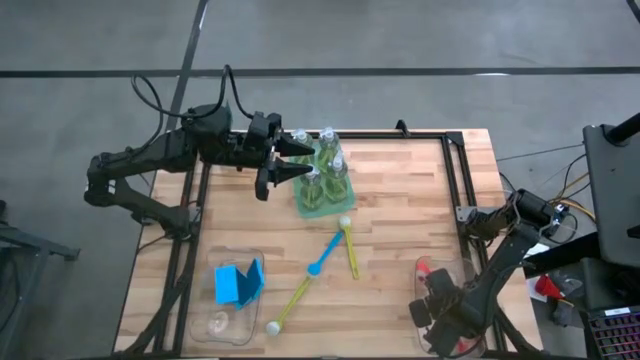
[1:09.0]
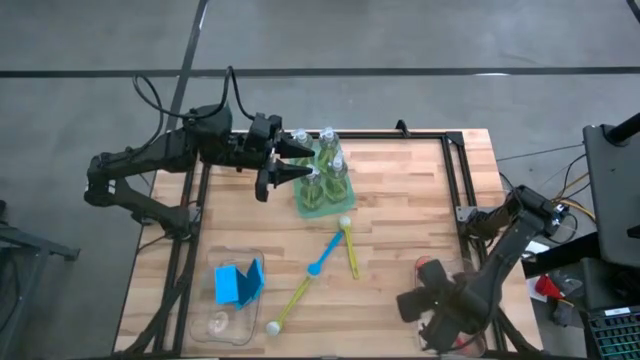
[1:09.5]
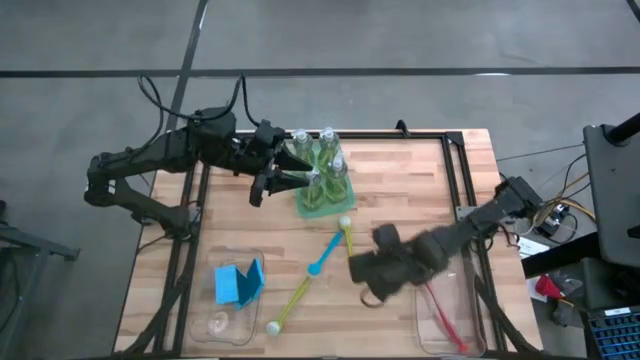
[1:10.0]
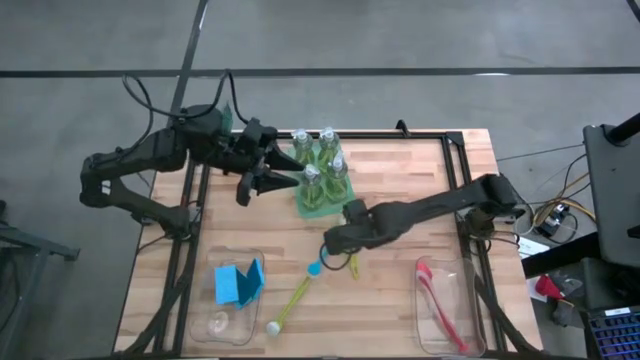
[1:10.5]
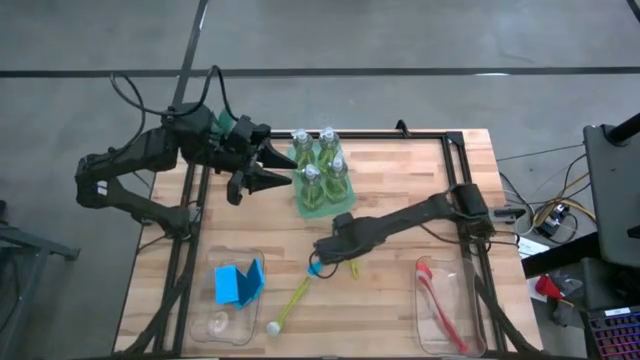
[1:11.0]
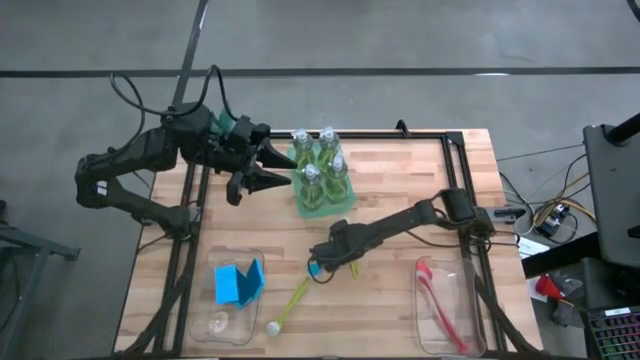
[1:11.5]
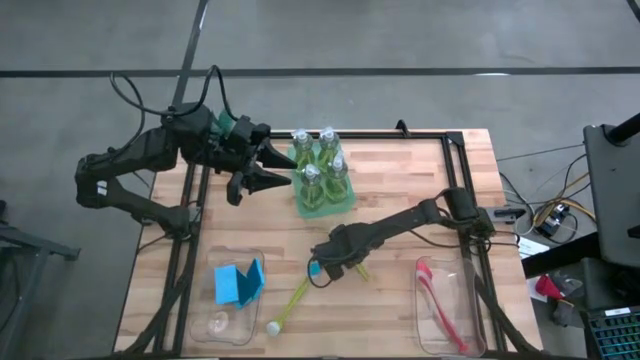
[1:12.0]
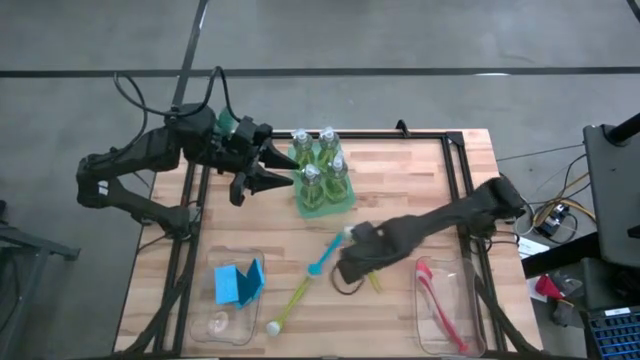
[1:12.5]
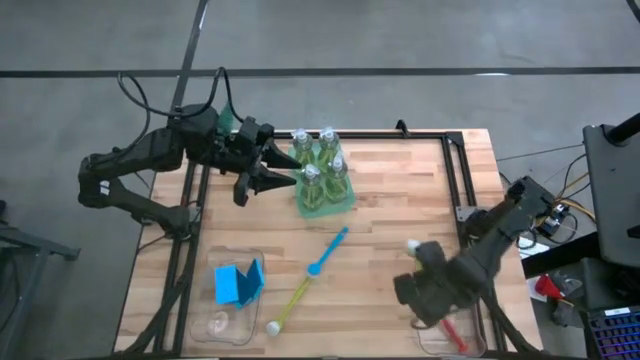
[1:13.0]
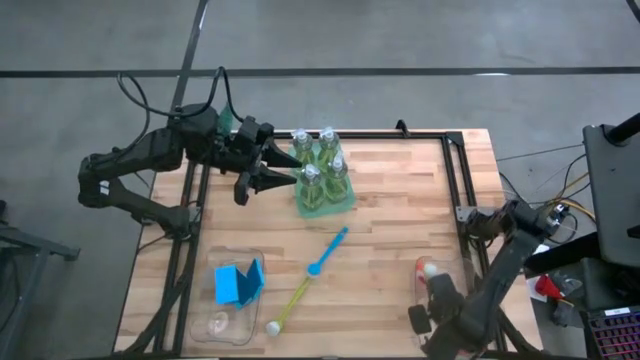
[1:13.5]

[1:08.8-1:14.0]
Task: Pick & Place Kitchen Sink Supplies
Put the right green dish brush into the right transparent bin

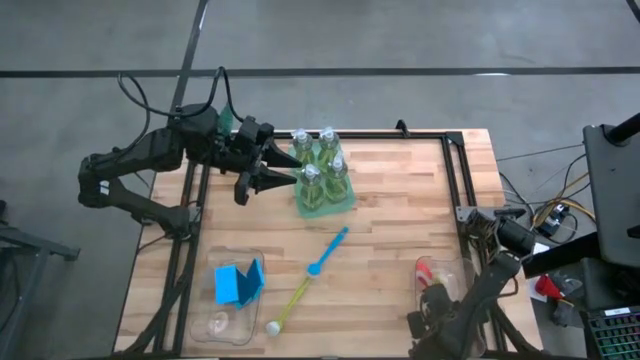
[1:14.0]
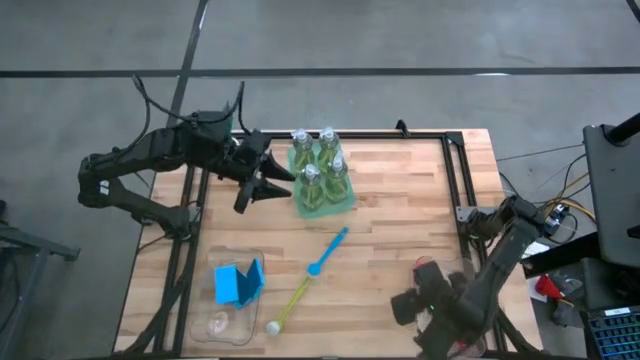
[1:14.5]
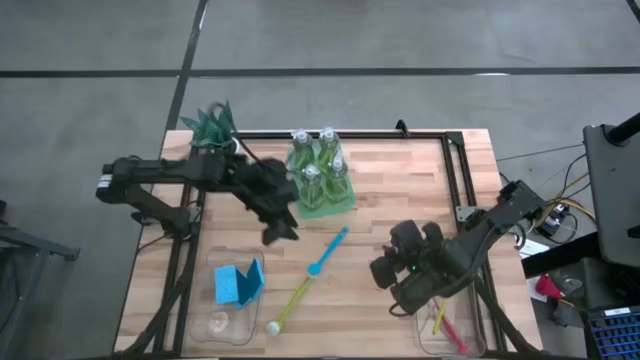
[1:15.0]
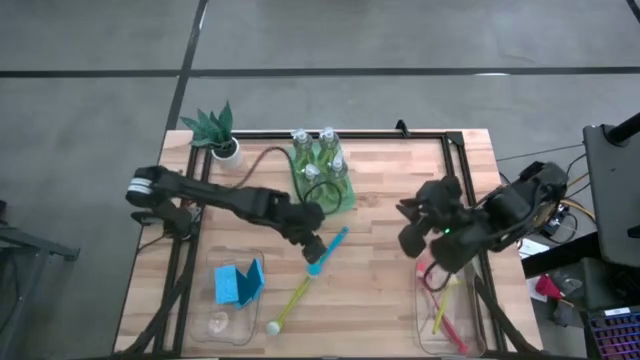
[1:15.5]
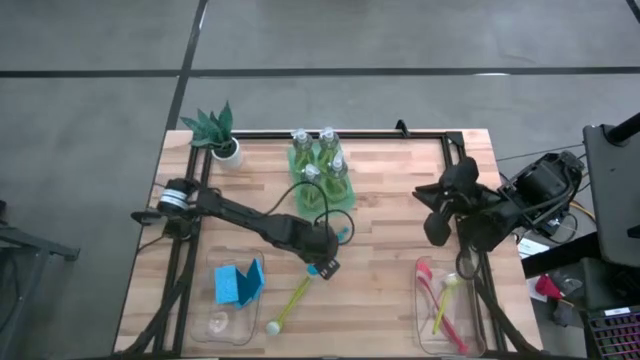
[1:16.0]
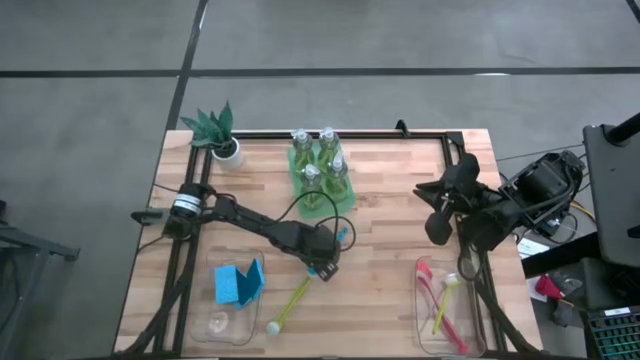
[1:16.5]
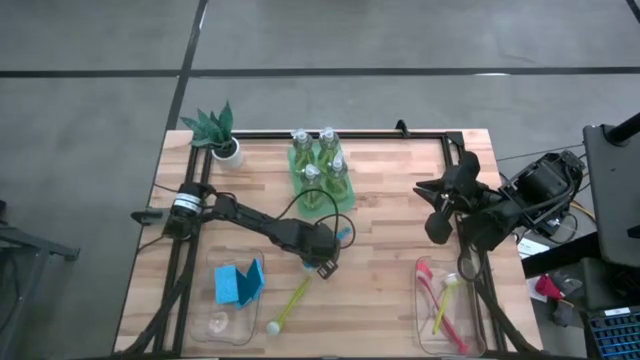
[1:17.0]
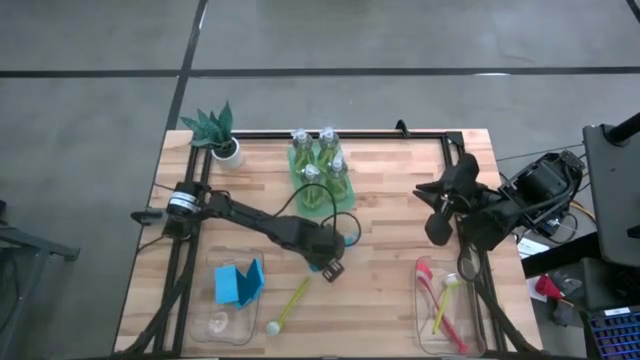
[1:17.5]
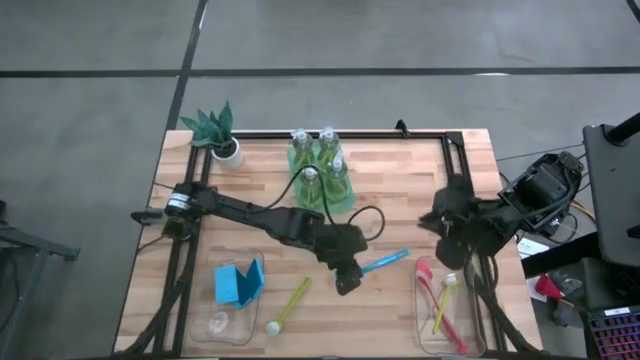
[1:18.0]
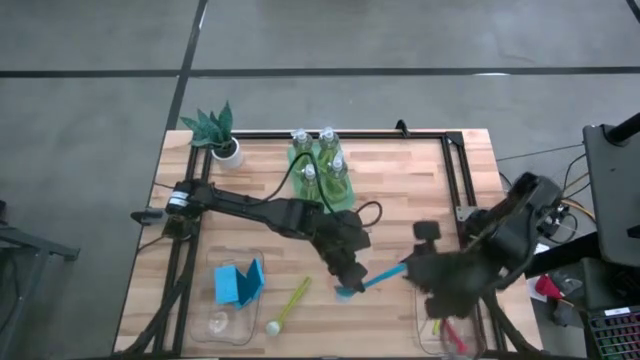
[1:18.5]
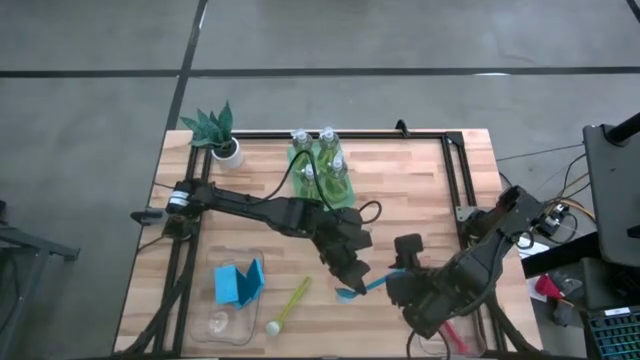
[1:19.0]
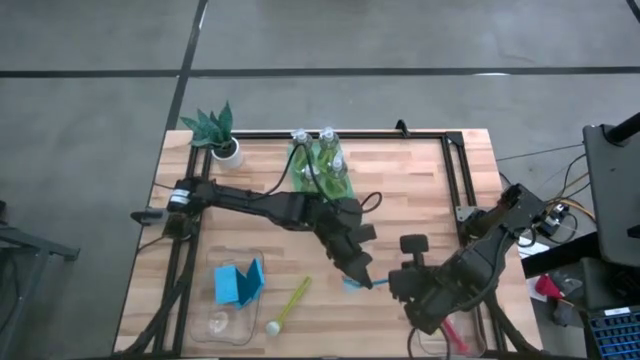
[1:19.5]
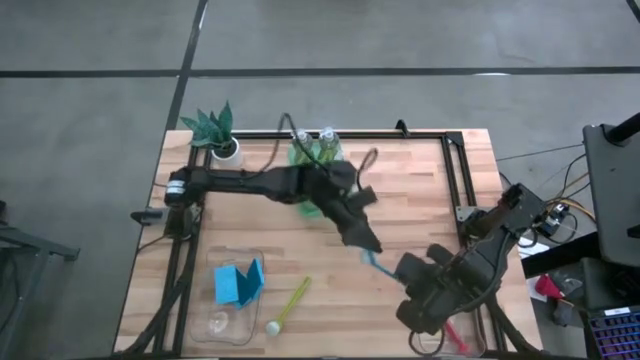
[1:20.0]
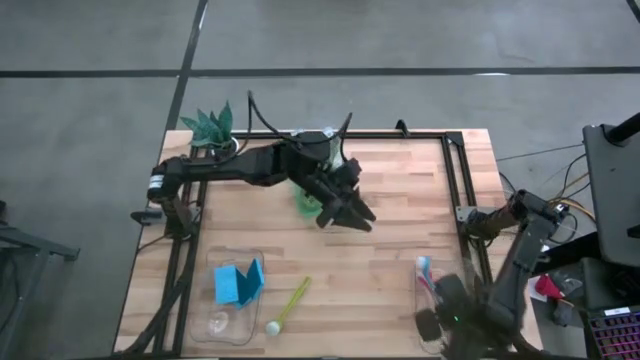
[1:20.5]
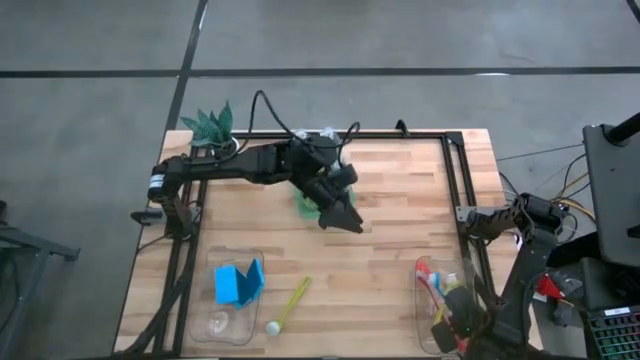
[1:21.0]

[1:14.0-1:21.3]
Put the blue dish brush into the right transparent bin

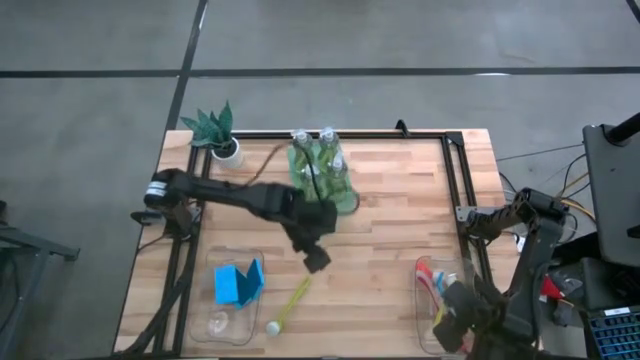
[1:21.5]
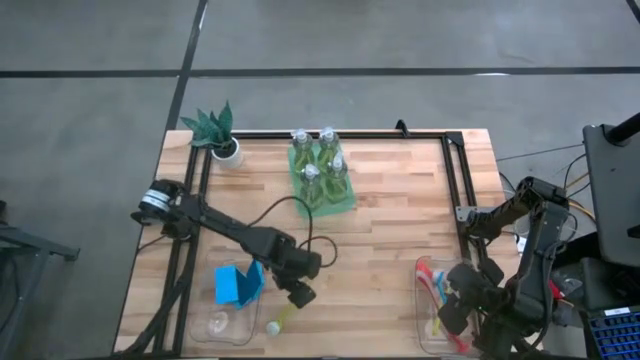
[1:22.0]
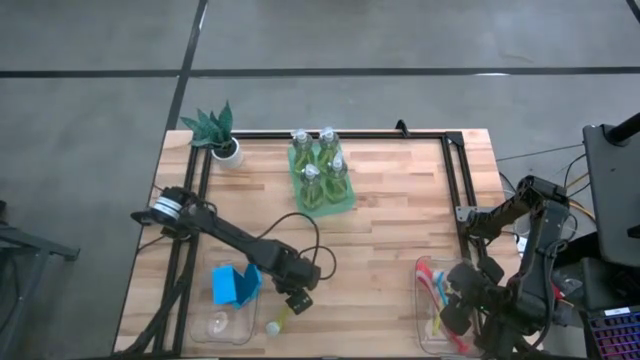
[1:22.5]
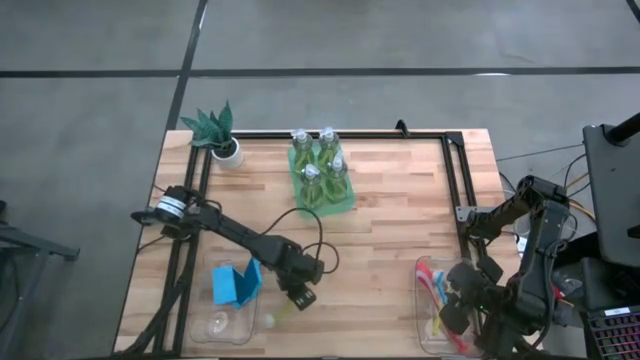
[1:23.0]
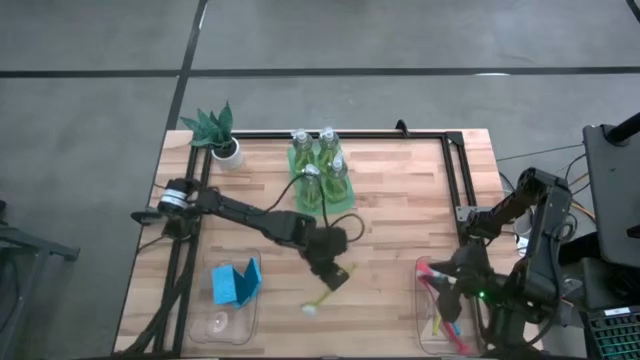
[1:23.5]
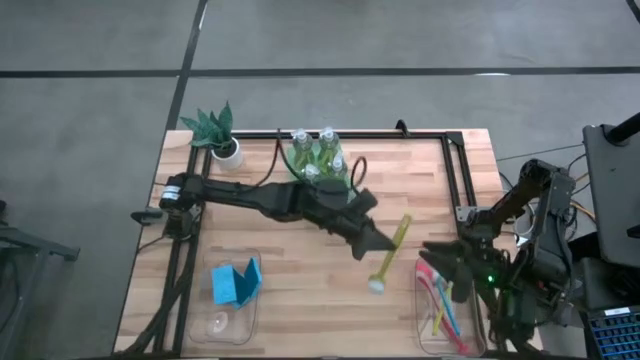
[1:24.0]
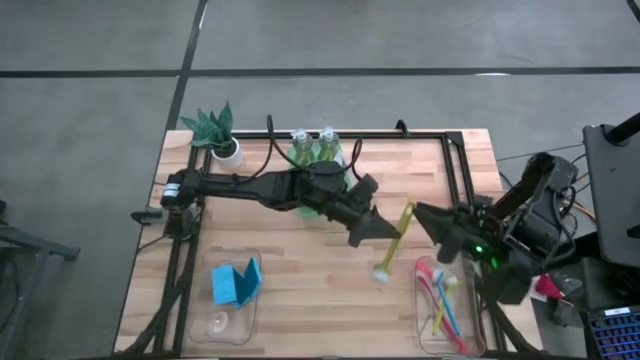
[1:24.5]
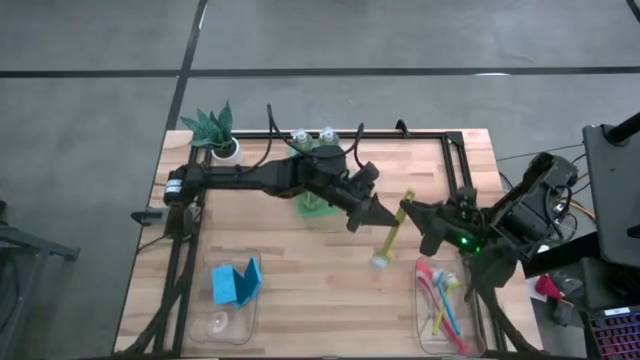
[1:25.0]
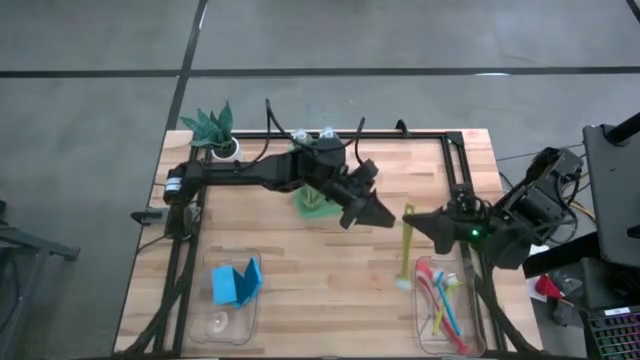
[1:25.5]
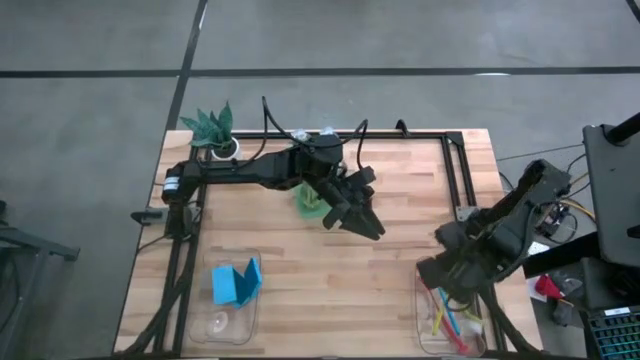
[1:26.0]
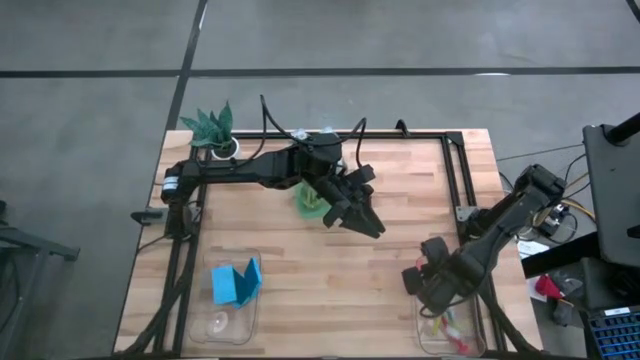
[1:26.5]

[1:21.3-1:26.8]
Put the green dish brush into the right transparent bin

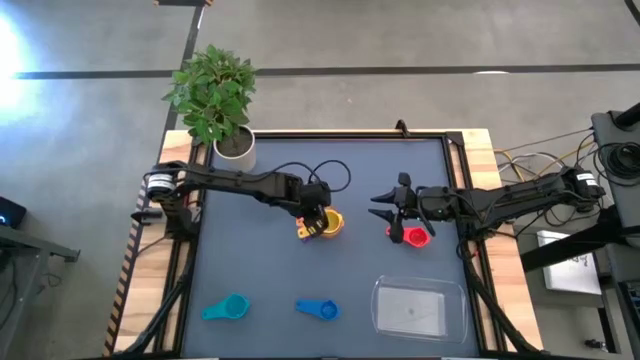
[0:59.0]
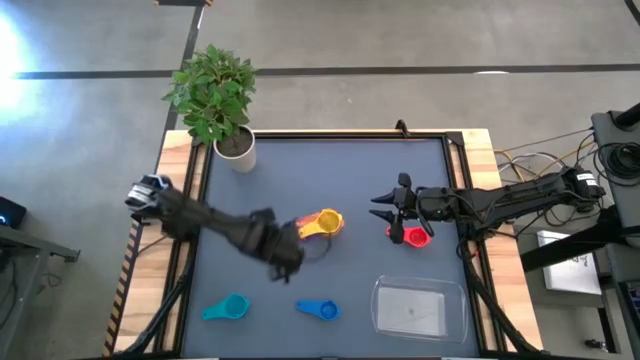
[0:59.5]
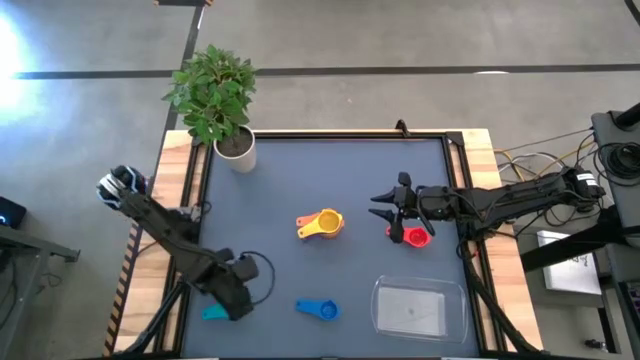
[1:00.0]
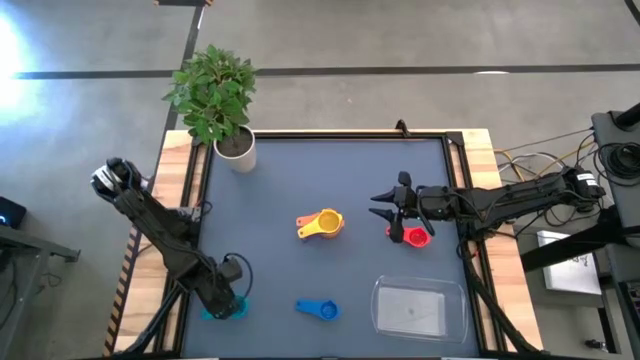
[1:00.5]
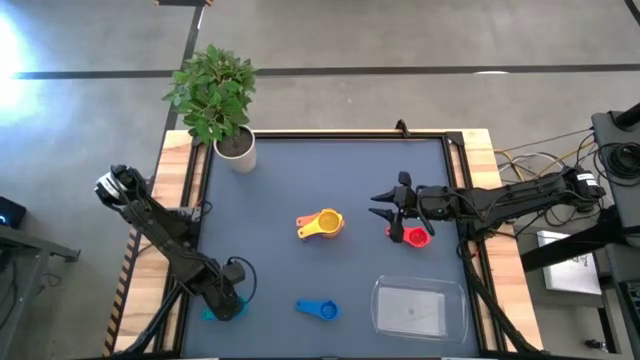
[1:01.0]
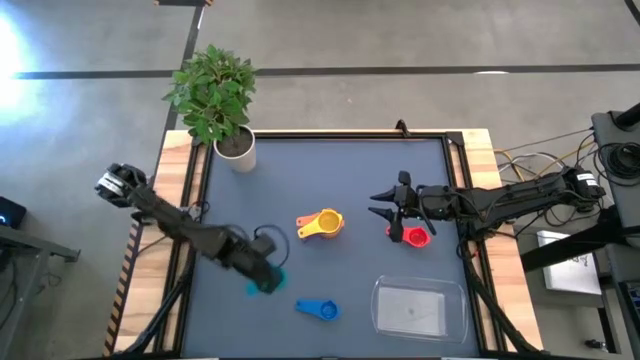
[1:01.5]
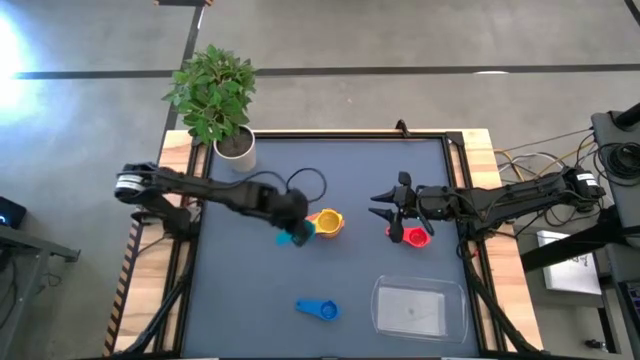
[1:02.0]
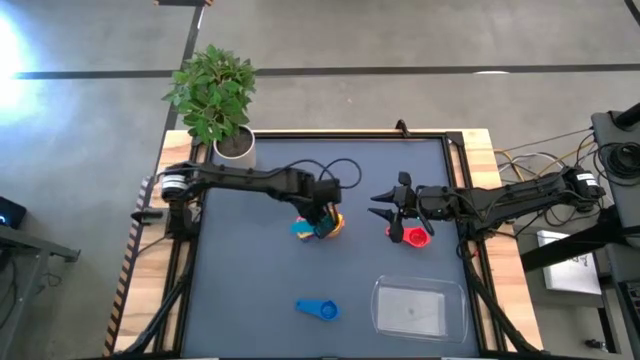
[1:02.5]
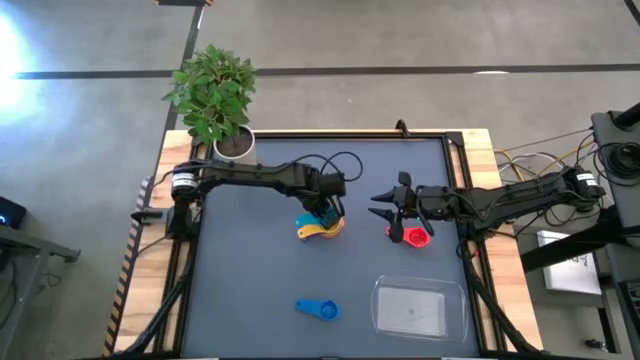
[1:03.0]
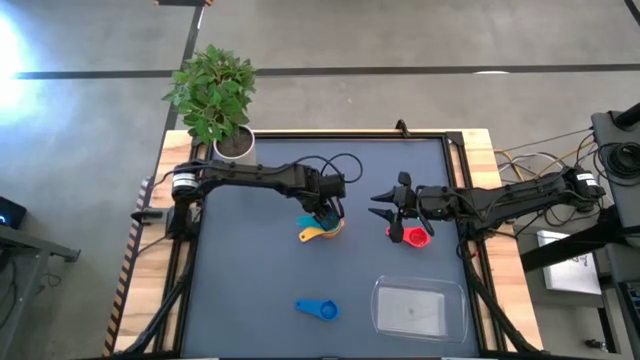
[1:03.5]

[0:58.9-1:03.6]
Task: Nest measuring cups in basket
Stack the light blue measuring cup on top of the yellow measuring cup
